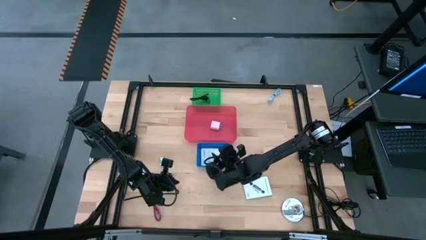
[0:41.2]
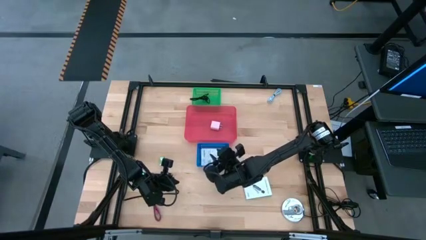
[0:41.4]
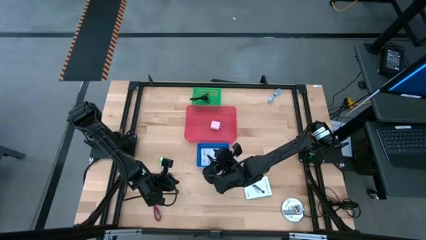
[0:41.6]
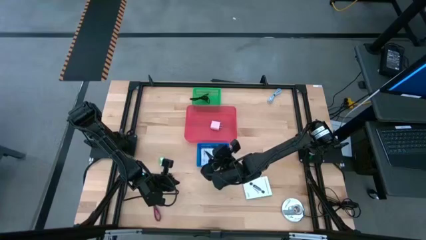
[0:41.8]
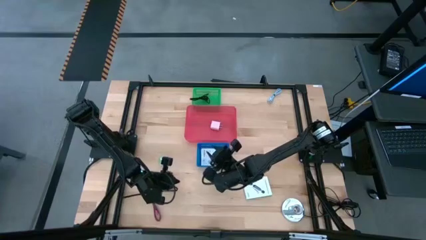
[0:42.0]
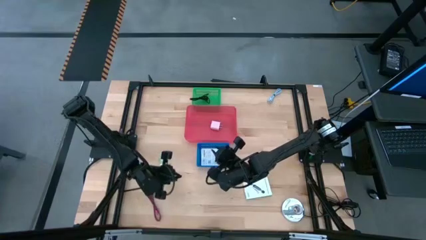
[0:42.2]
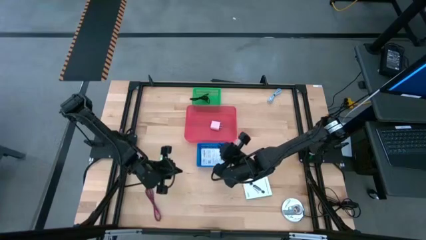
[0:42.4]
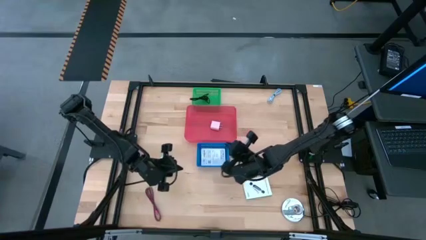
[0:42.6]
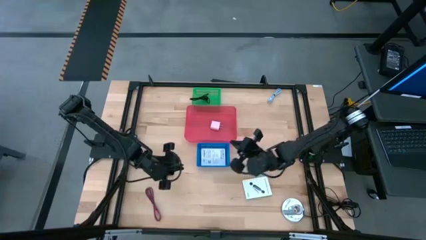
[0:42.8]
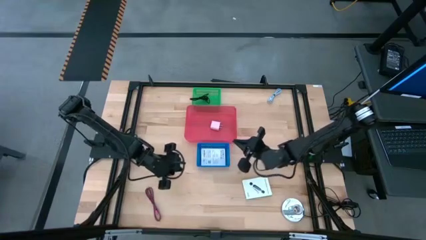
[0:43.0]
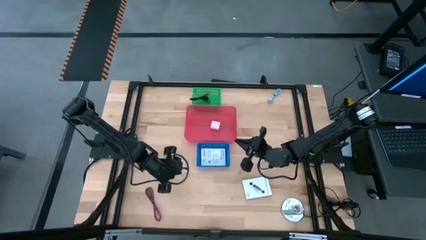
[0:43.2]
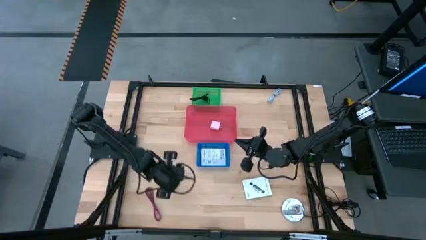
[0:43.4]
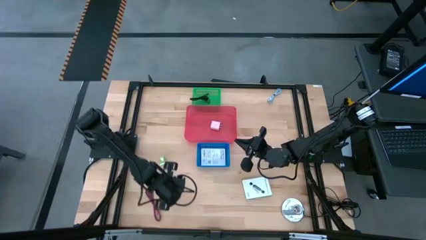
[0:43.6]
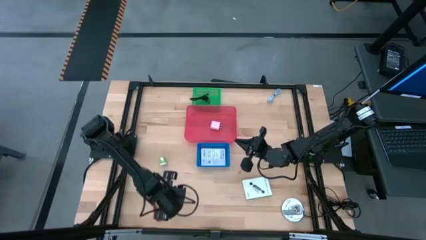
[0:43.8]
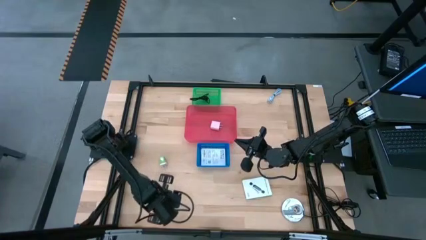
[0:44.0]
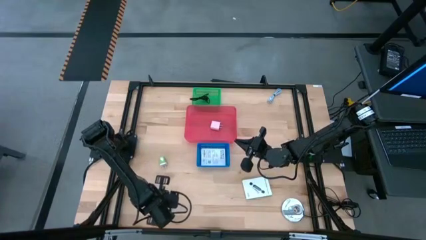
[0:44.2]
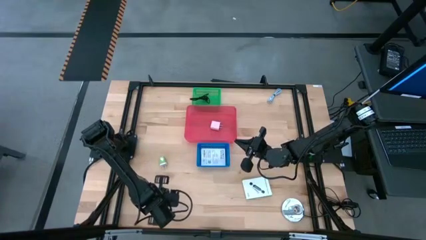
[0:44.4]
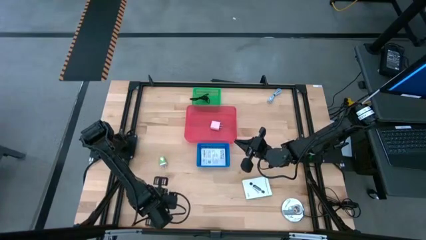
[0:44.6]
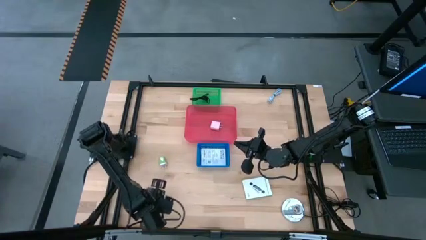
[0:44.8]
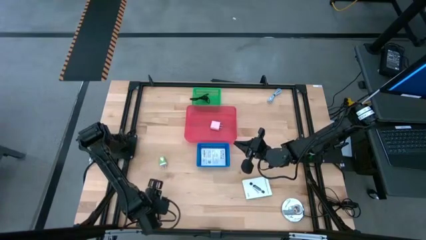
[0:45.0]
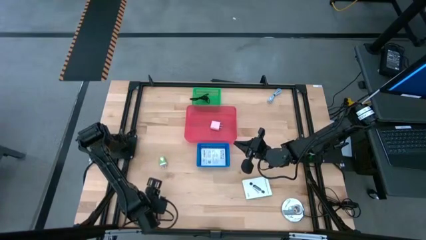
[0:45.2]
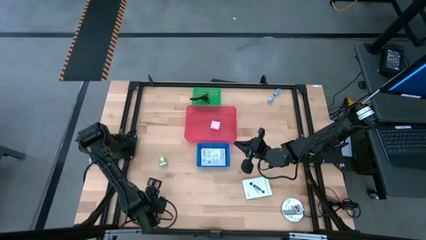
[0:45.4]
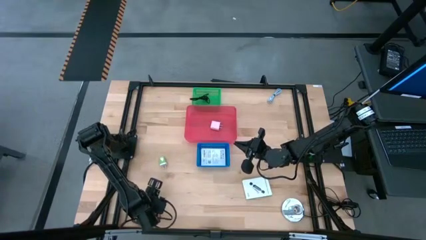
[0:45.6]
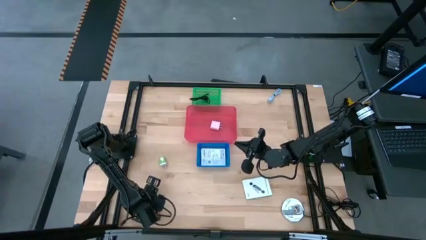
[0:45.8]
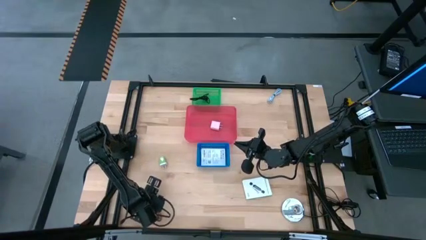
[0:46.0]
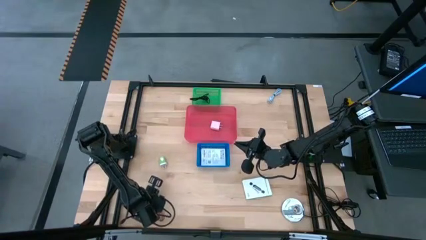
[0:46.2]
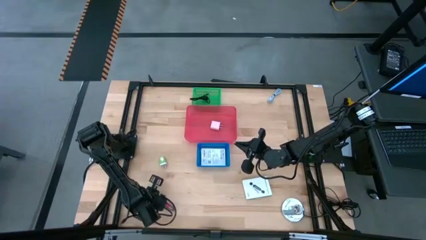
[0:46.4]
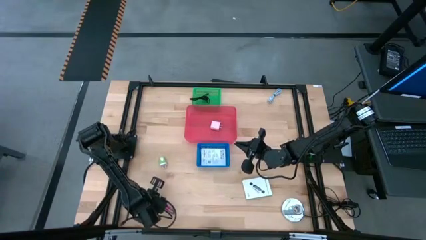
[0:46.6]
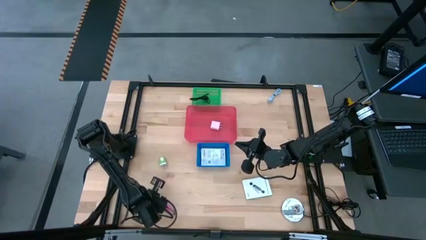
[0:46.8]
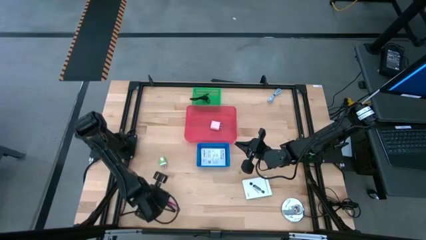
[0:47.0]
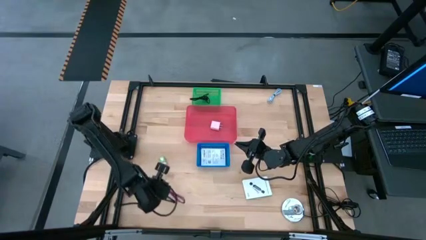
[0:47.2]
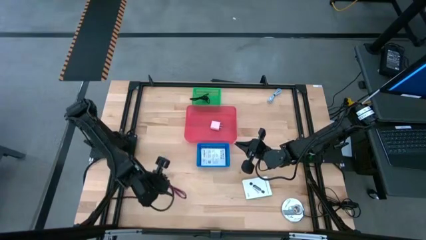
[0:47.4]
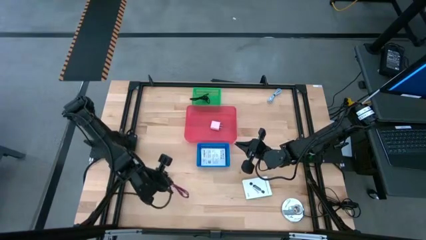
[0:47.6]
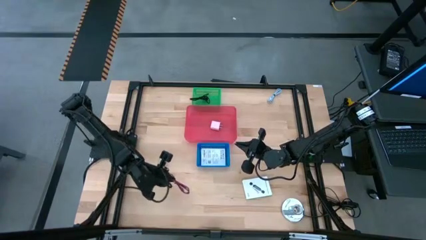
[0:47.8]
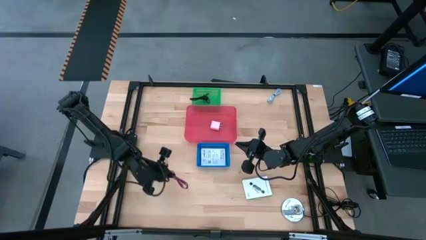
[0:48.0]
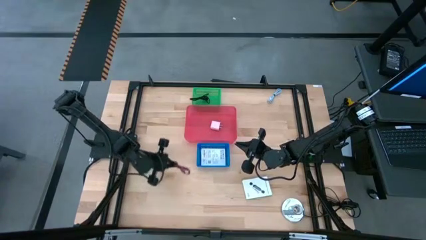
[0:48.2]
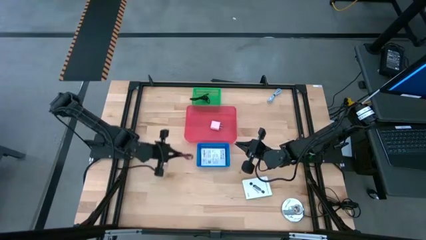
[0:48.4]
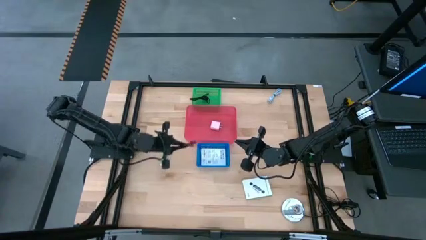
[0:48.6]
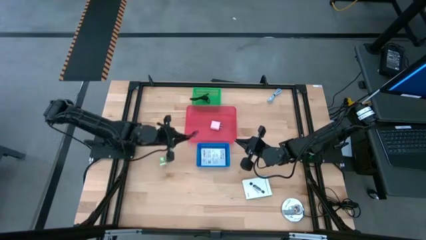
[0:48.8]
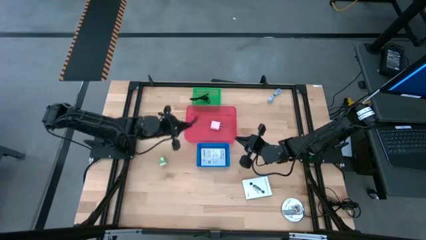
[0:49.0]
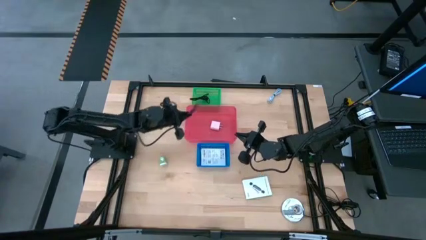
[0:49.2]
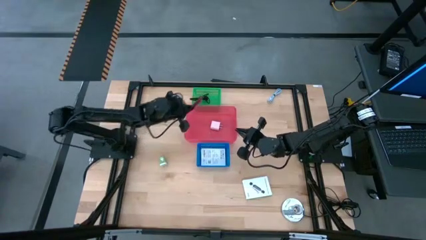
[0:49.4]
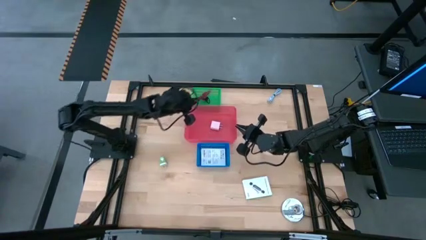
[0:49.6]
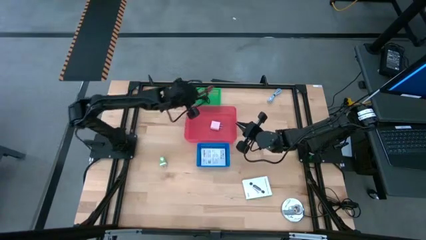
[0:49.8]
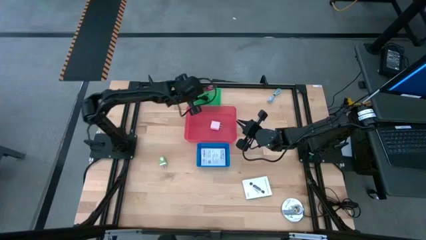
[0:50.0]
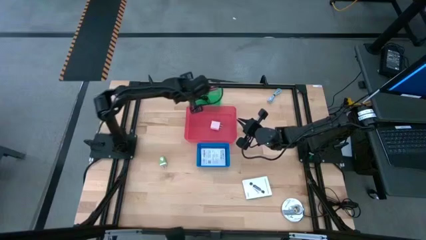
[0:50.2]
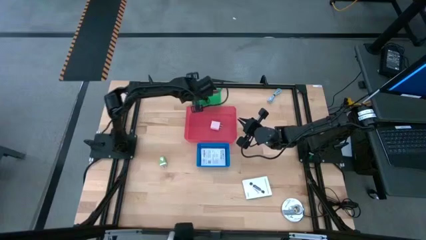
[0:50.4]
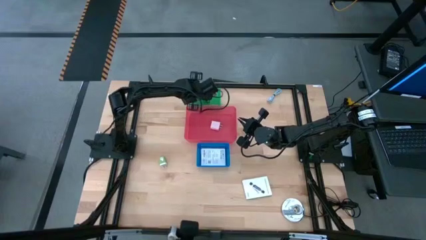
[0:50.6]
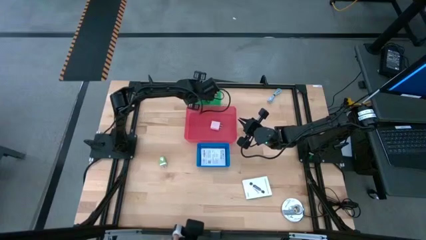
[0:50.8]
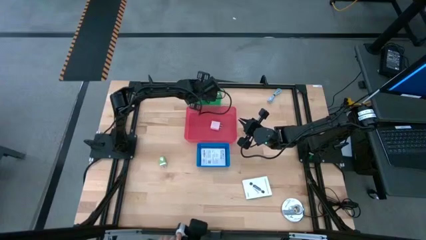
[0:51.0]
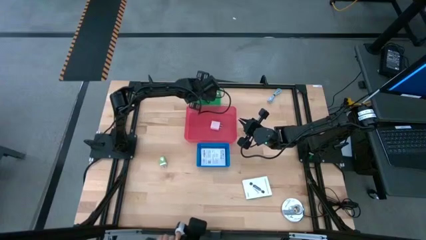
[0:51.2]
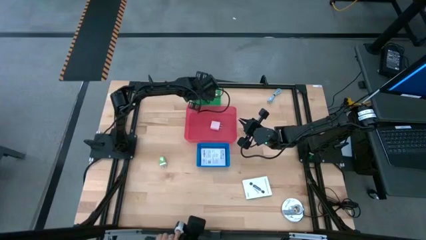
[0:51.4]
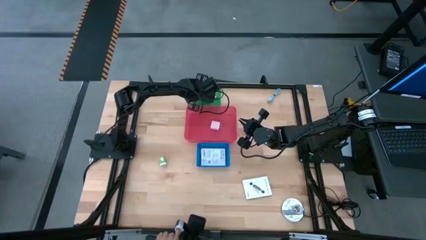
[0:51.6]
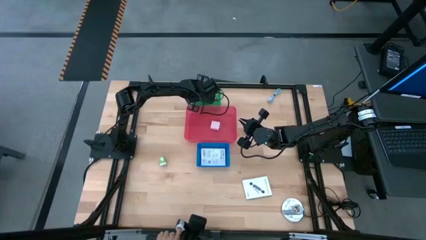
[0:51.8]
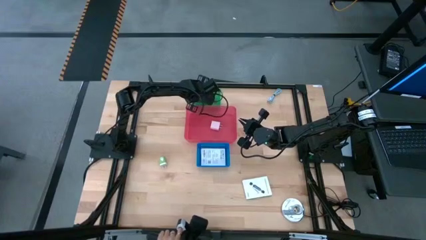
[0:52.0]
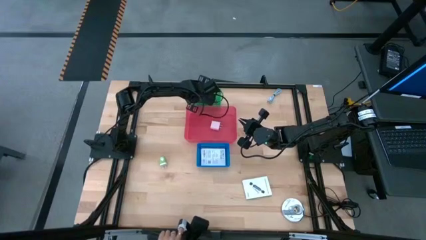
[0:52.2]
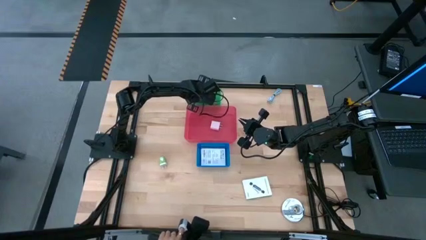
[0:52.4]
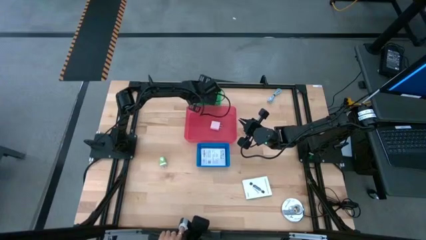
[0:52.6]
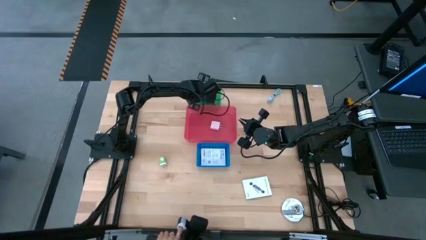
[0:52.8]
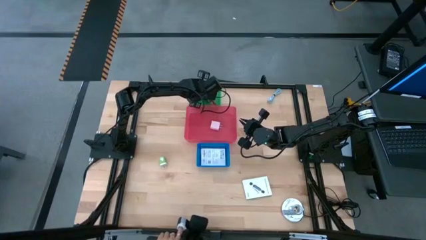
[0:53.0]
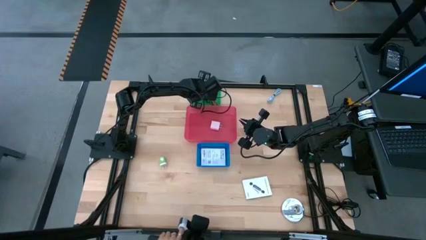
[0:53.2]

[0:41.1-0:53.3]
Task: Pick and place items into bin
Put the pink charger cable into the green bin
